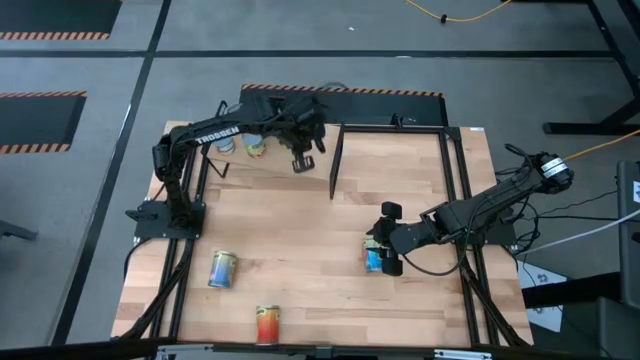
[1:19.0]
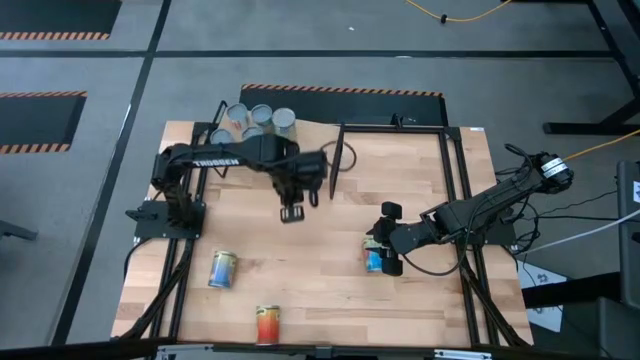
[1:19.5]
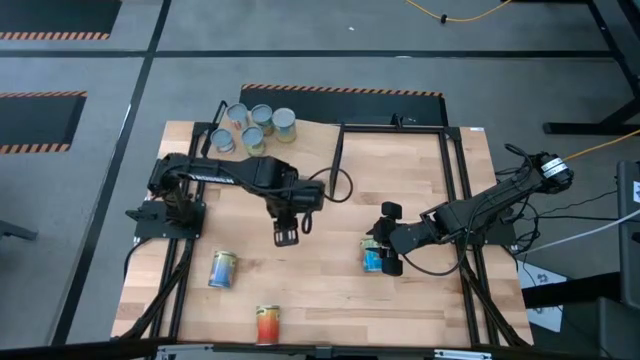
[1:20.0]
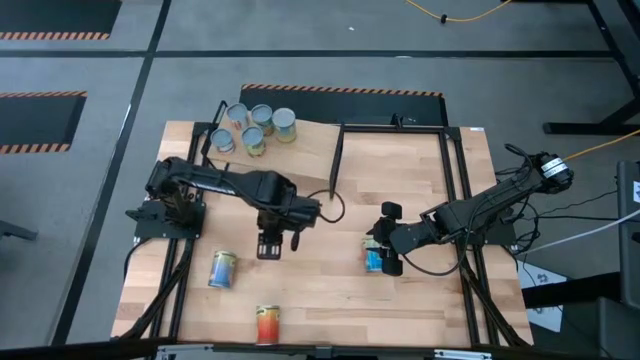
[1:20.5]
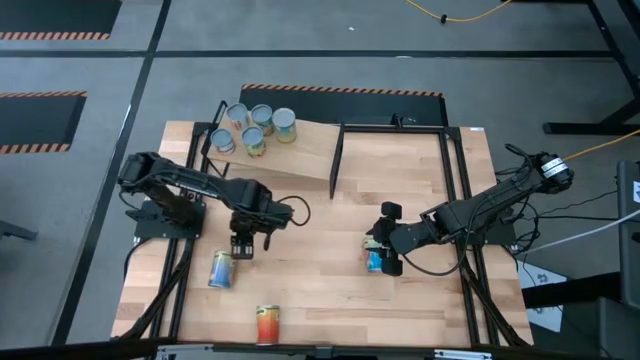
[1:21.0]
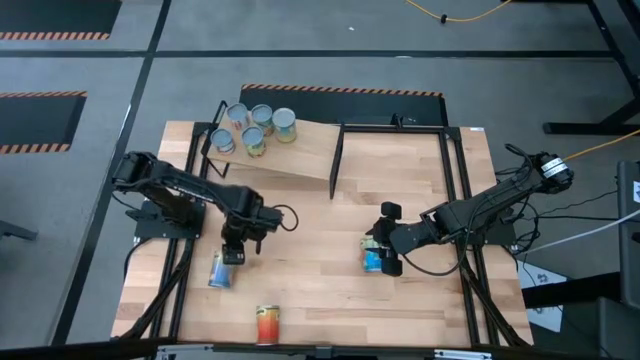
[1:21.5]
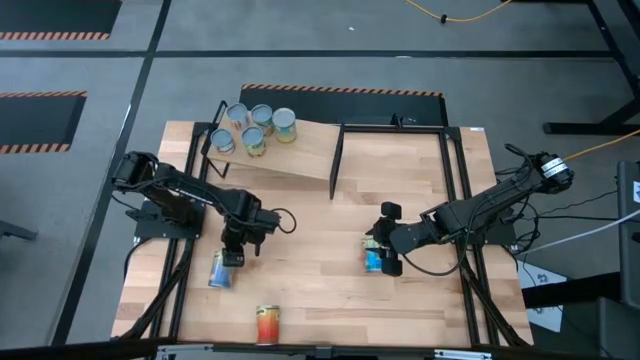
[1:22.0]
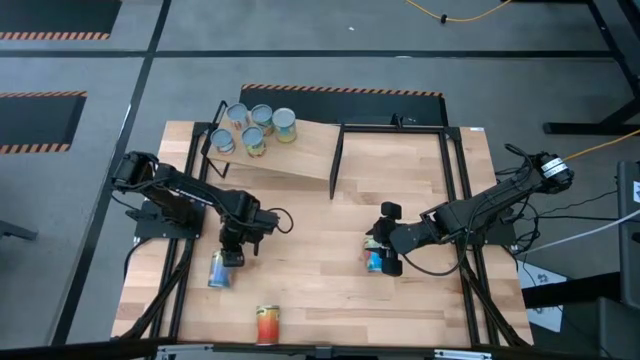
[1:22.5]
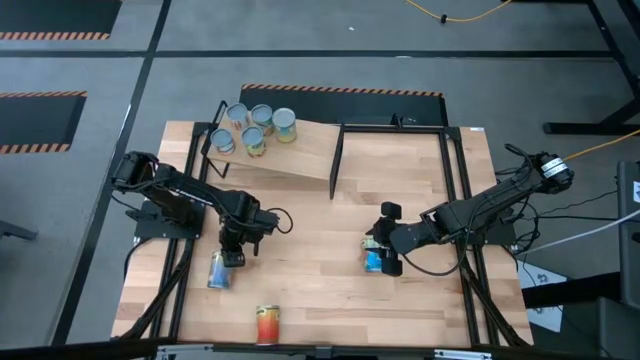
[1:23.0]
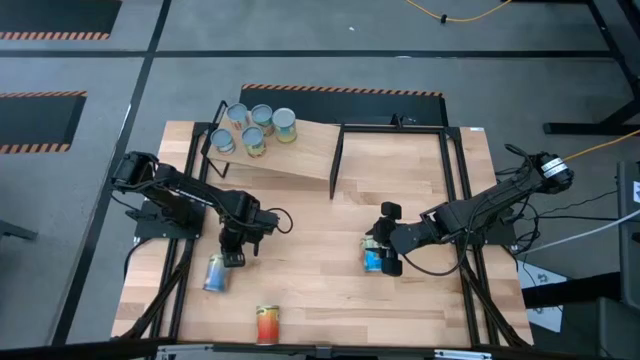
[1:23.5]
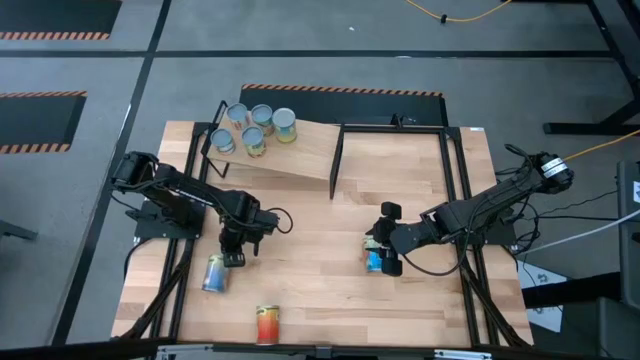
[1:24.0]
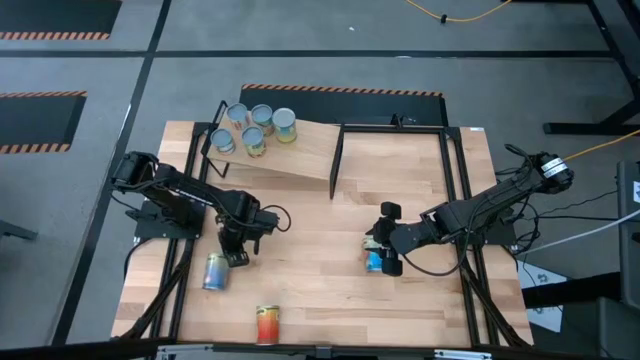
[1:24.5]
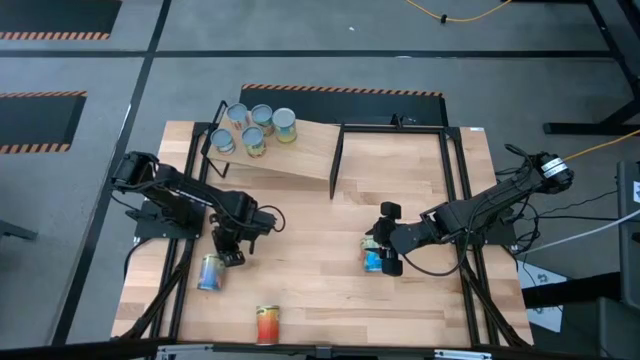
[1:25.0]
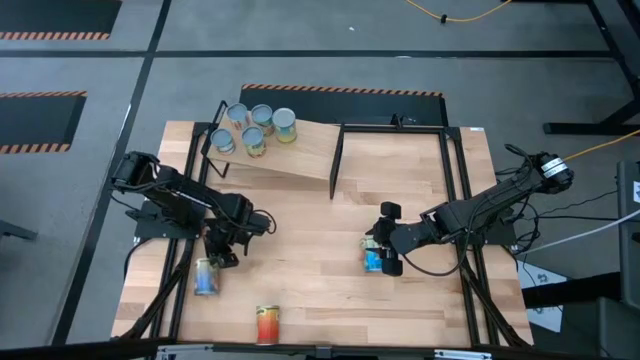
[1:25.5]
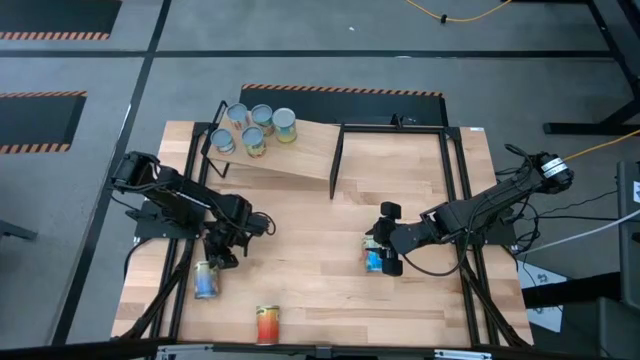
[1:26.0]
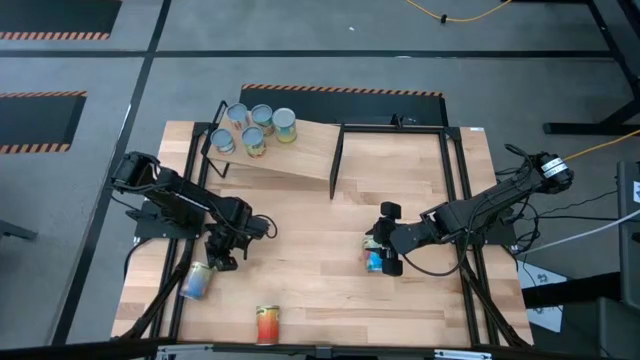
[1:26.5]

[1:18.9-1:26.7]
Task: Pick and place cans onto a shelf
Put the canned peaches on the shelf

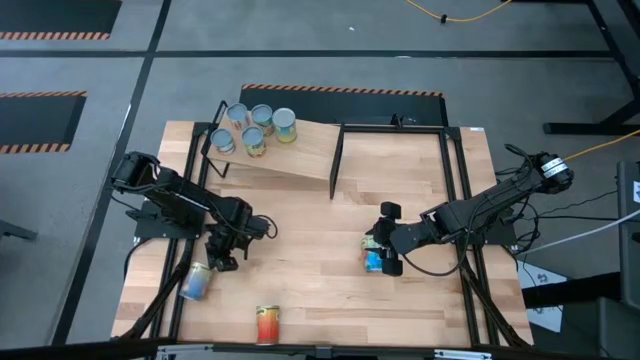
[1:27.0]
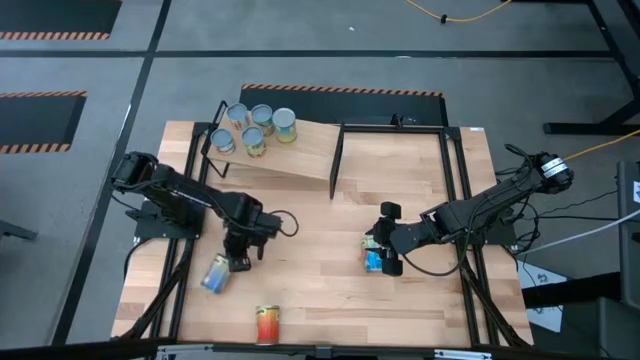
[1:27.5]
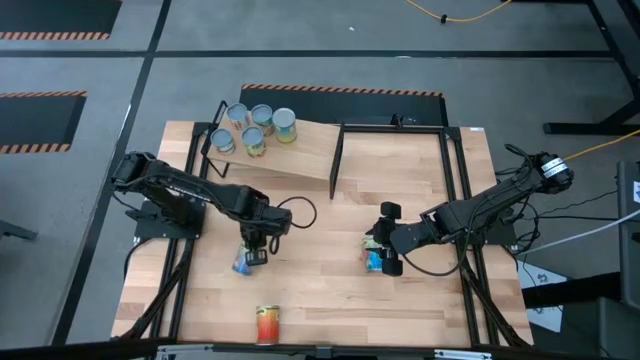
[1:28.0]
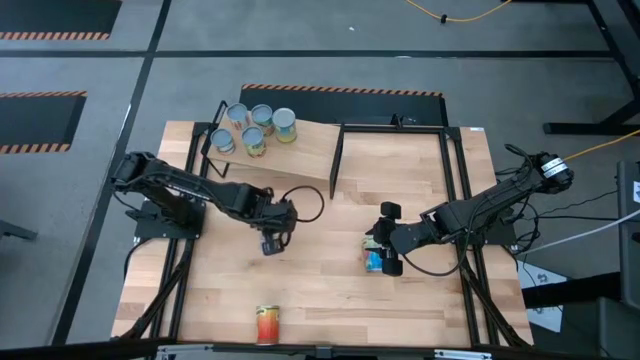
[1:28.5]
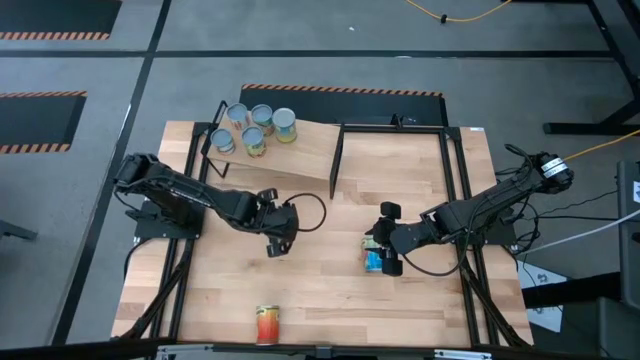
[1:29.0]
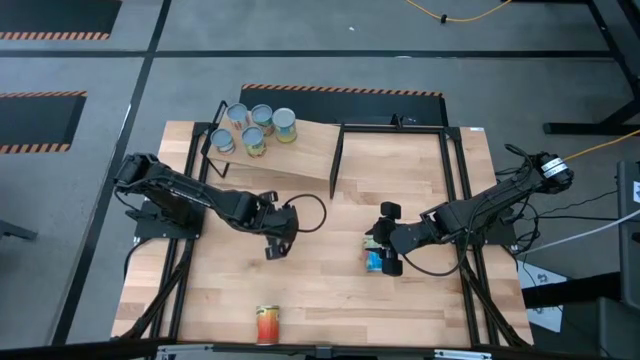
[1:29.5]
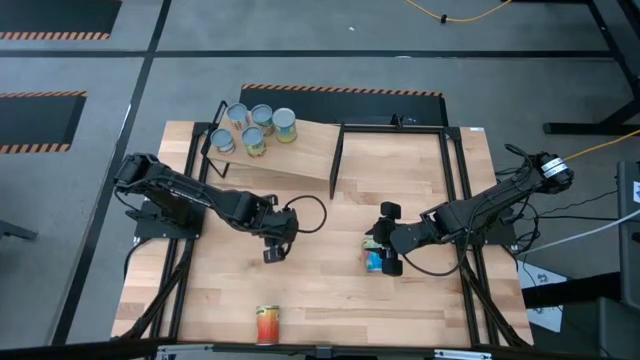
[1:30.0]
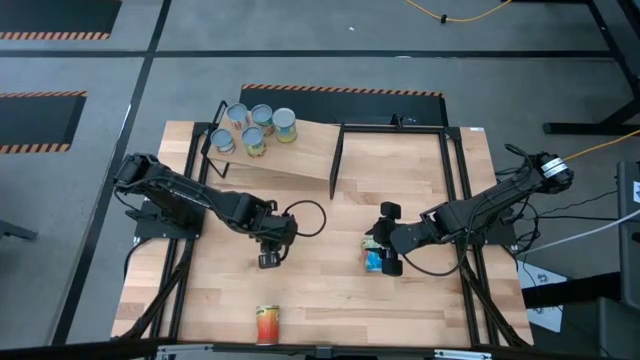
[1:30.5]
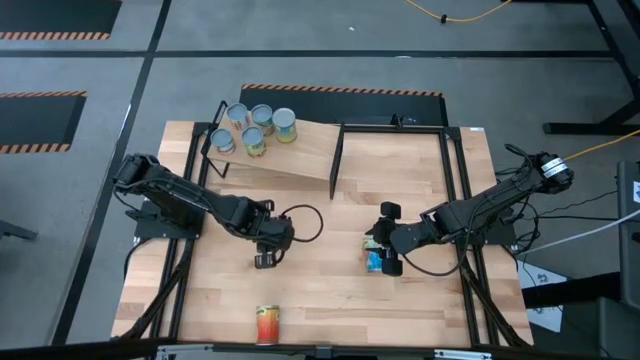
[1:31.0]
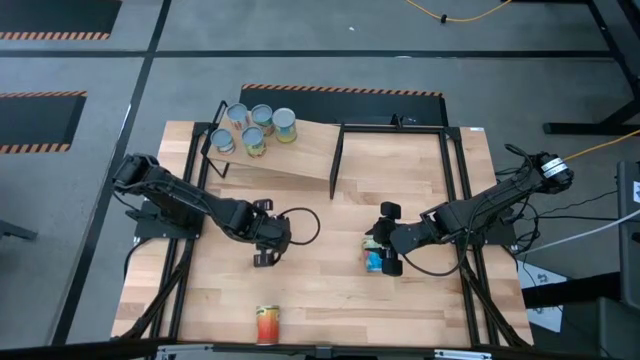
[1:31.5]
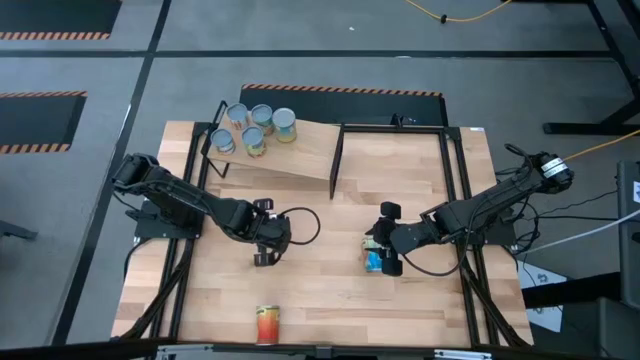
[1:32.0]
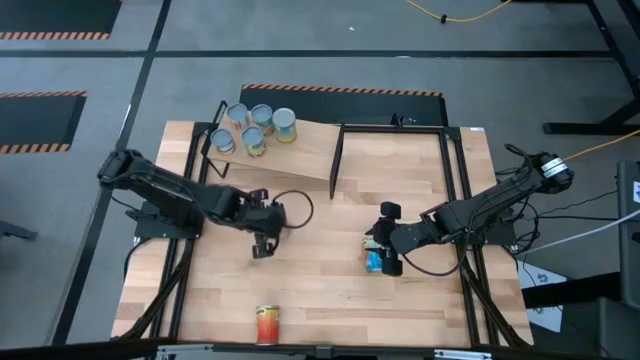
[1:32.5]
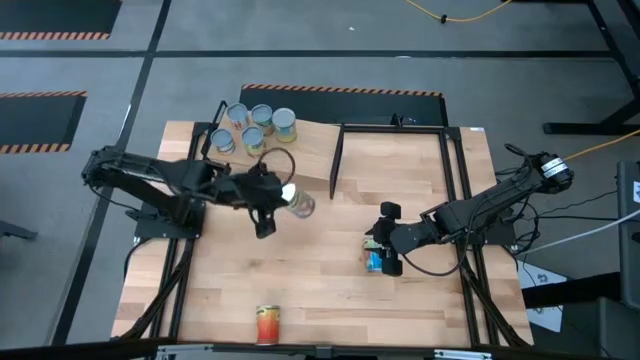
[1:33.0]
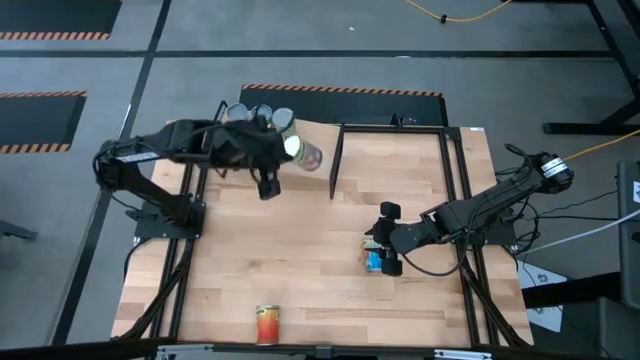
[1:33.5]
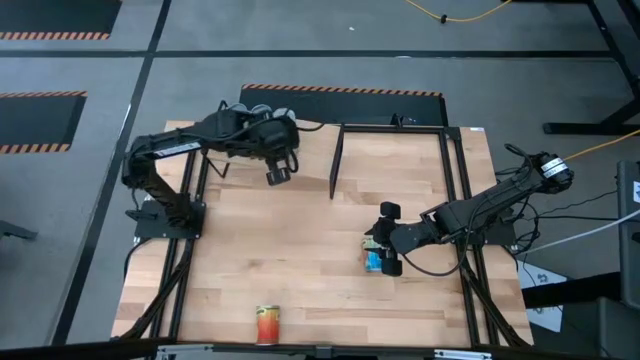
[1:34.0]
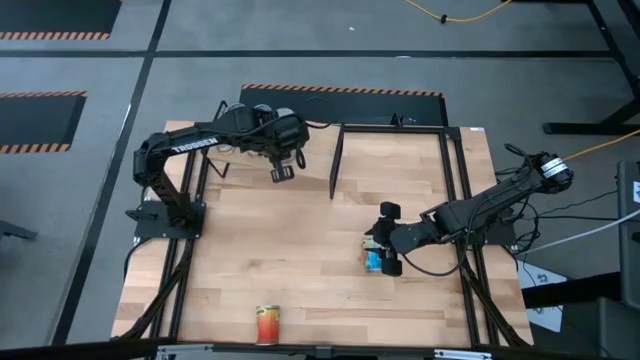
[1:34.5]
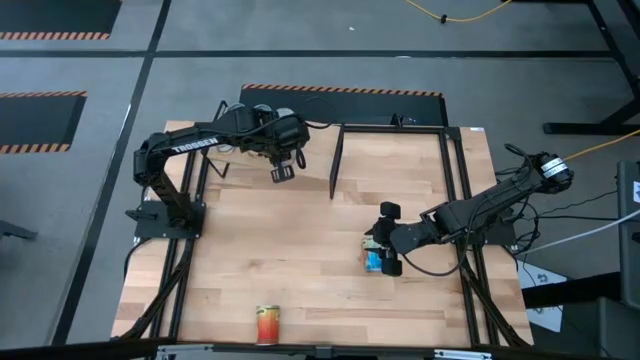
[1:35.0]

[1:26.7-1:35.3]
Put the canned peaches on the shelf aligned with the other yellow canned carrot

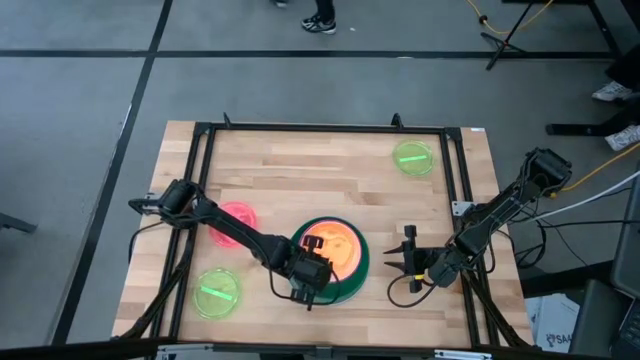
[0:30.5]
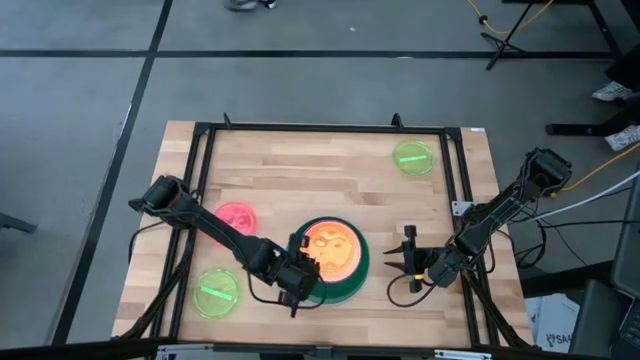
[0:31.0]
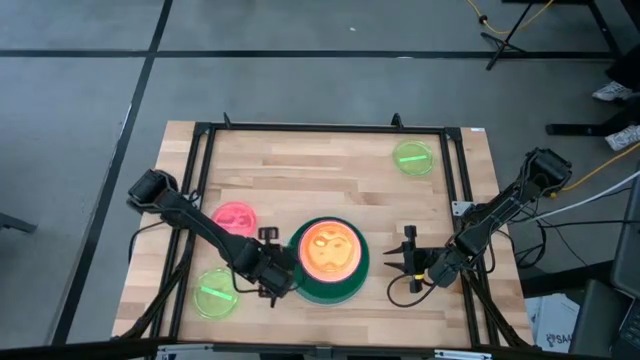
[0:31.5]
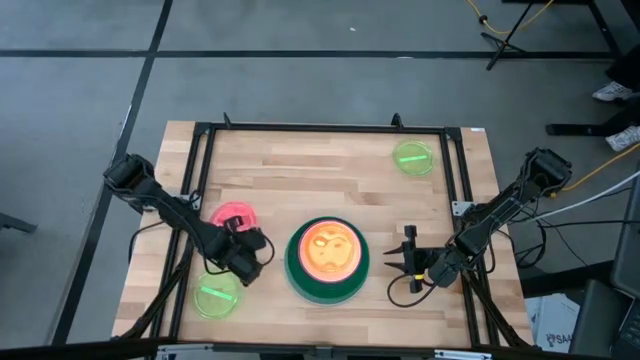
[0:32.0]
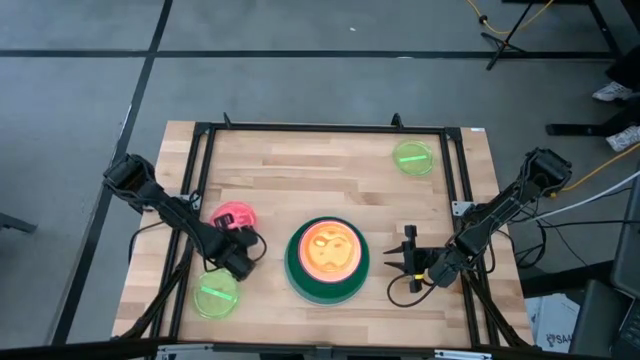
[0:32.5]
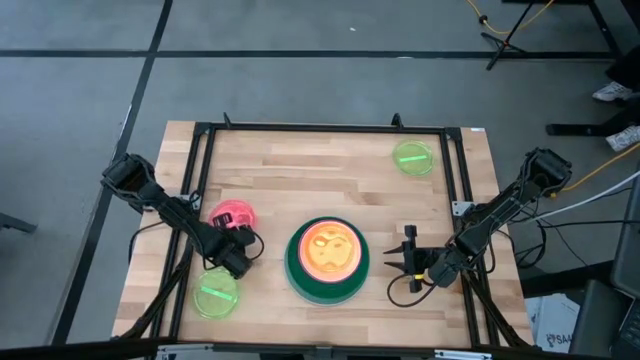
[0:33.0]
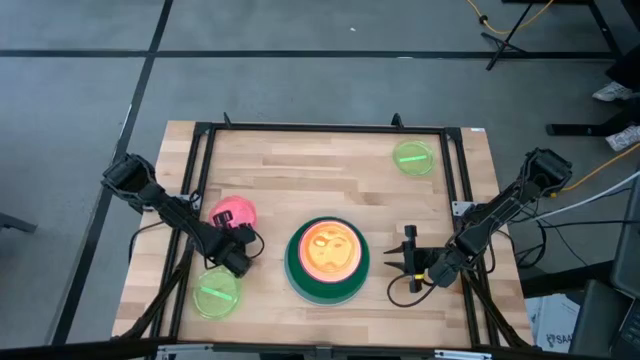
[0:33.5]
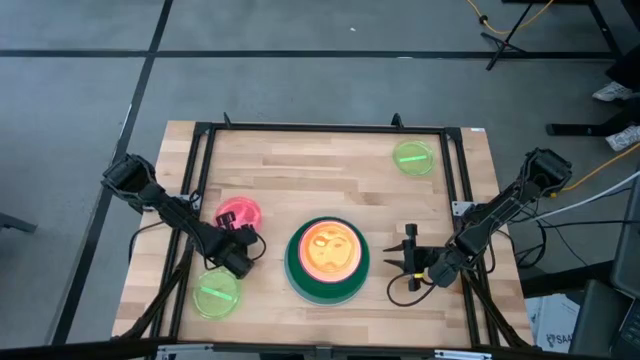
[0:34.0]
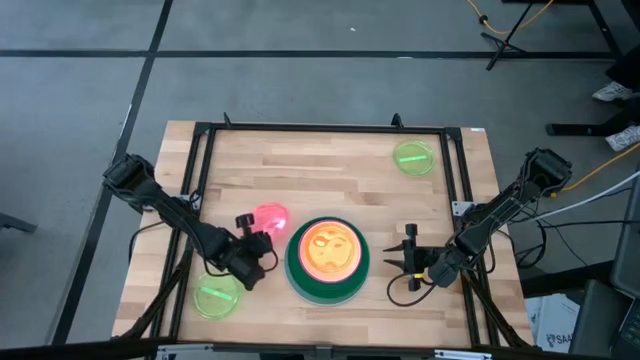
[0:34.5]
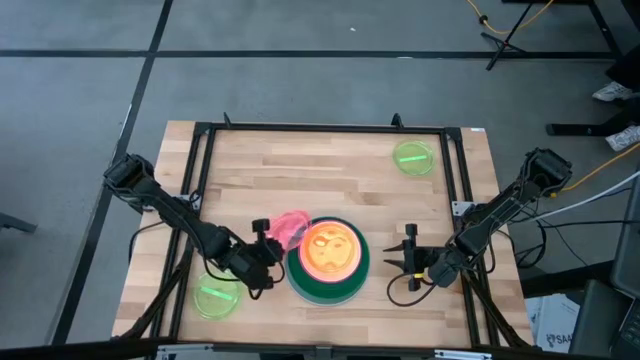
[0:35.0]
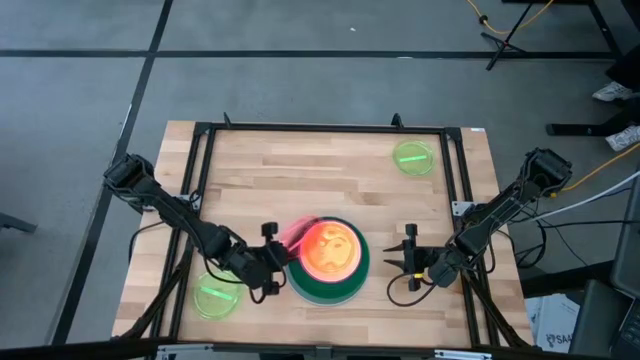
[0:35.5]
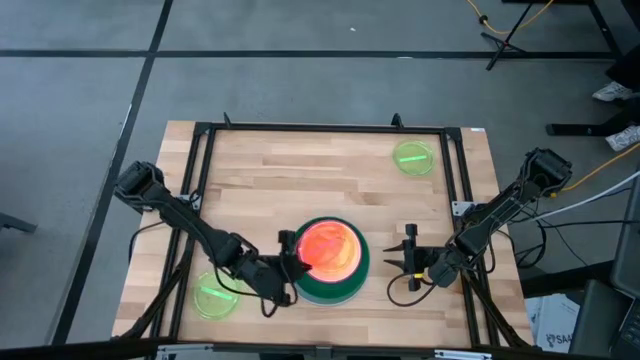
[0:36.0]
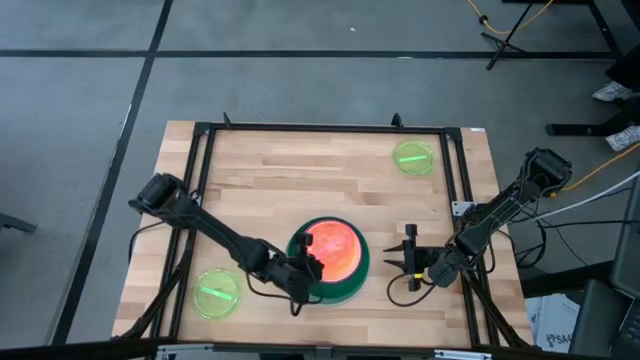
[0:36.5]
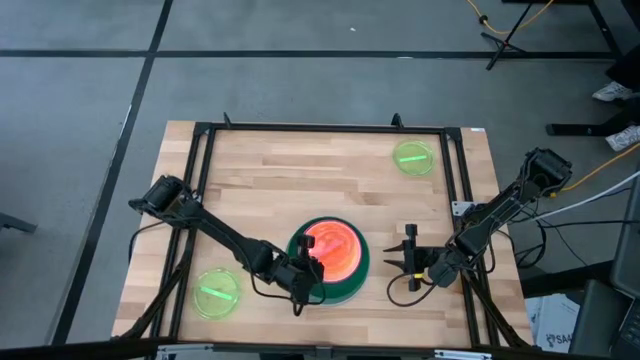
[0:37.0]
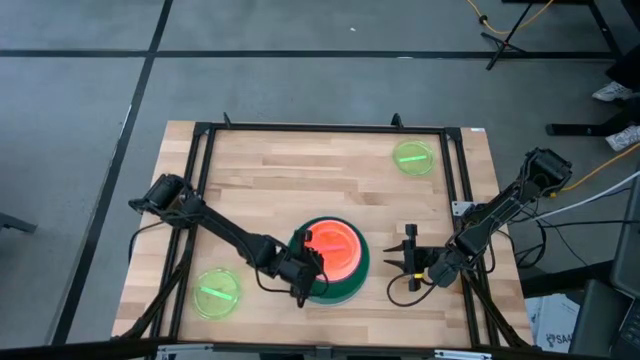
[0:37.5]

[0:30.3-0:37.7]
Task: Stack plastic plates
Stack the red plate on top of the orange plate
